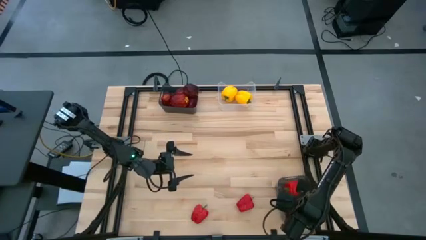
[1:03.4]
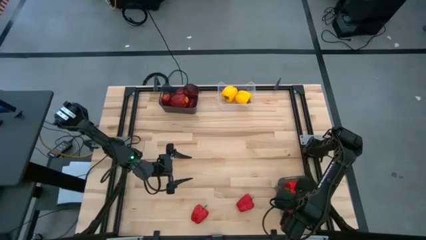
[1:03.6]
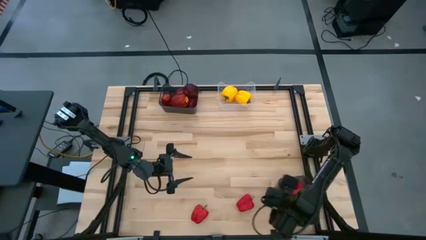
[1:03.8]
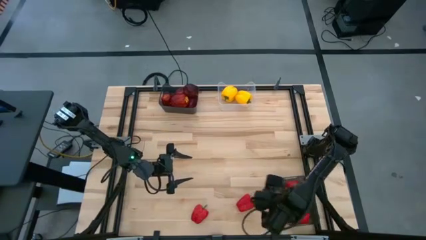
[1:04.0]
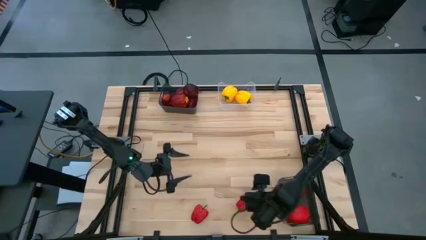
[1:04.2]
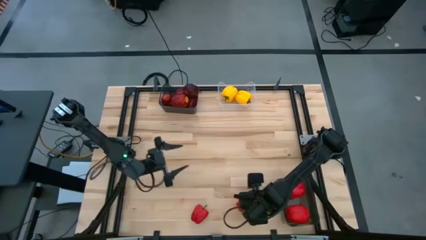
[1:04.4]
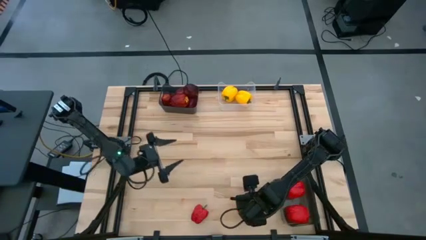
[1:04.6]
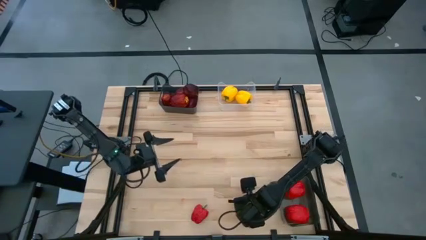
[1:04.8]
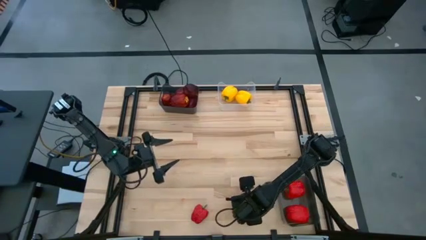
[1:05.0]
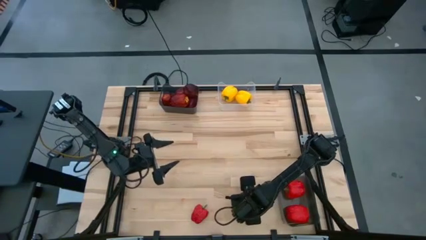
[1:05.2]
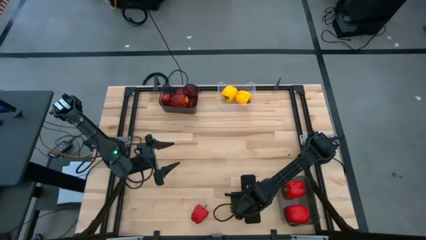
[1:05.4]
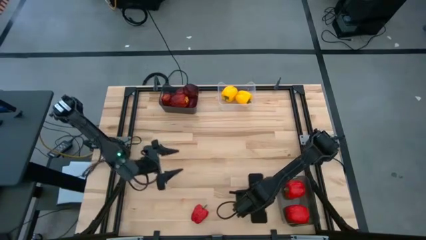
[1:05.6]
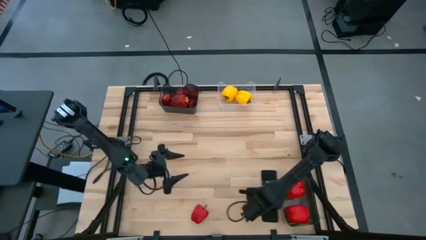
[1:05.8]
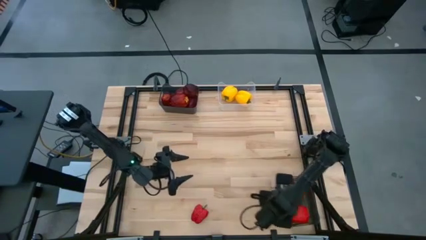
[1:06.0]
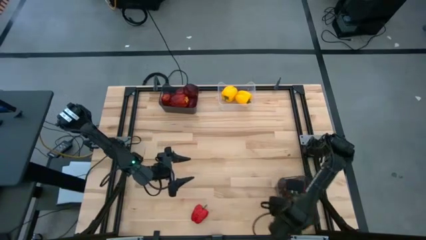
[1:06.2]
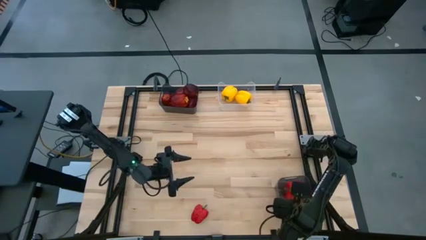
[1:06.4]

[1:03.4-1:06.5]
Task: Sort produce into baskets
Put the red bell pepper into the bottom black bin

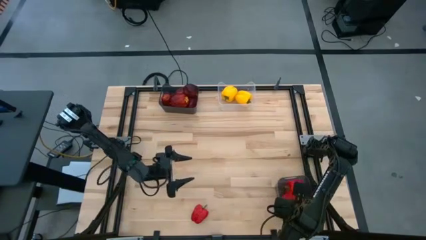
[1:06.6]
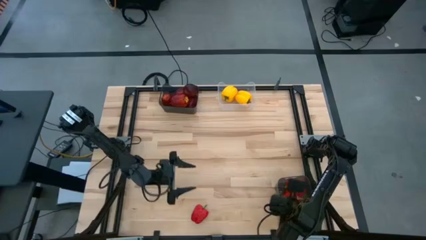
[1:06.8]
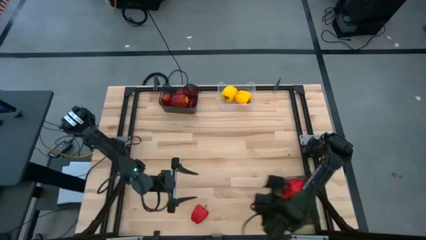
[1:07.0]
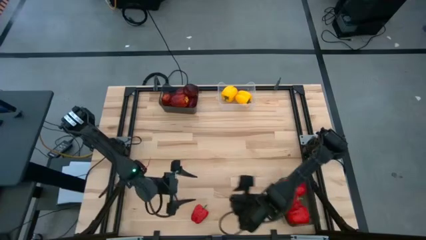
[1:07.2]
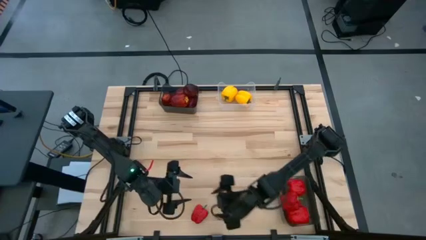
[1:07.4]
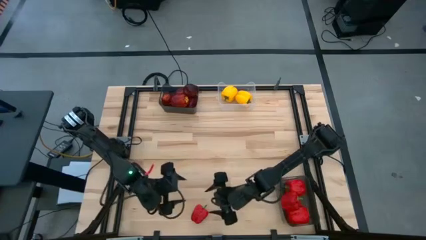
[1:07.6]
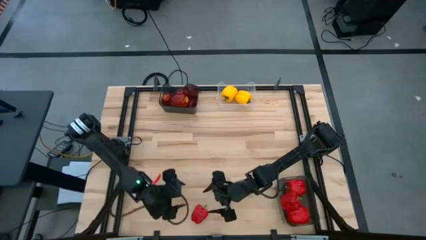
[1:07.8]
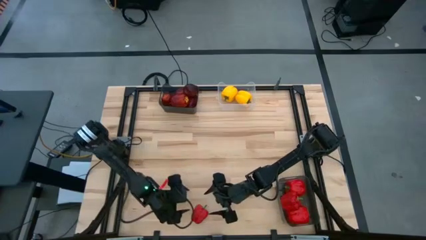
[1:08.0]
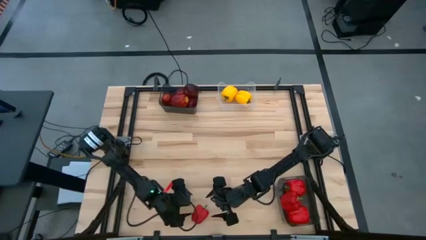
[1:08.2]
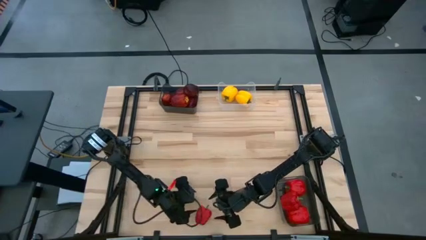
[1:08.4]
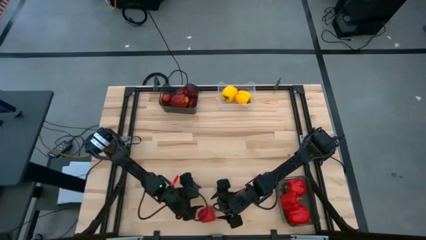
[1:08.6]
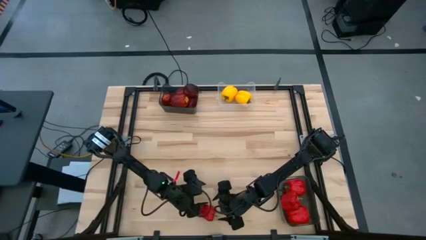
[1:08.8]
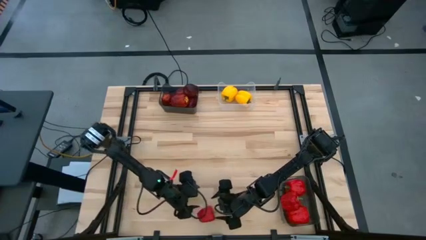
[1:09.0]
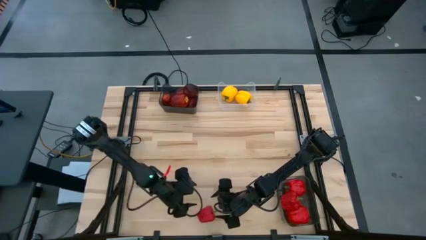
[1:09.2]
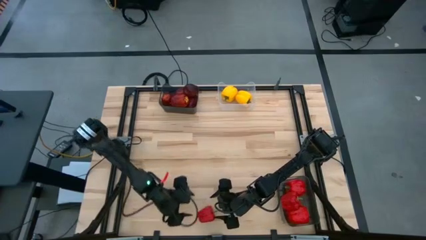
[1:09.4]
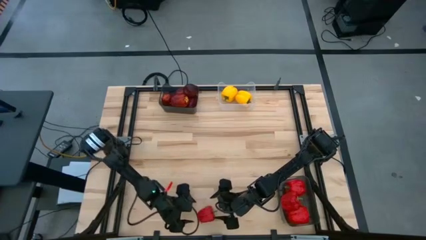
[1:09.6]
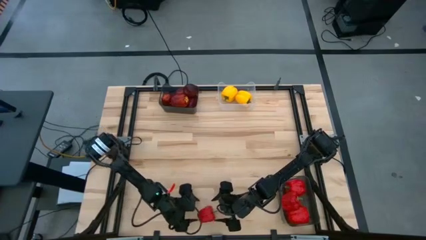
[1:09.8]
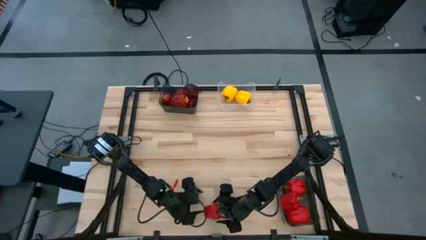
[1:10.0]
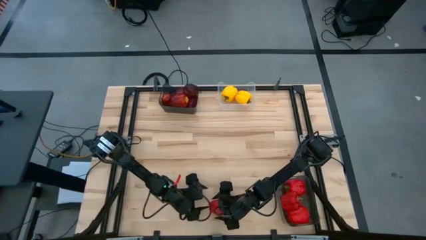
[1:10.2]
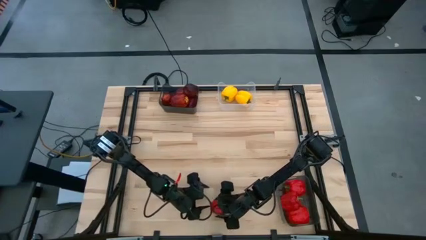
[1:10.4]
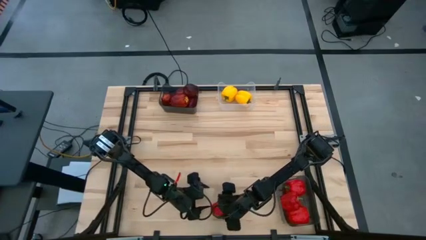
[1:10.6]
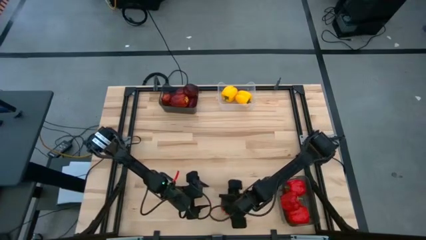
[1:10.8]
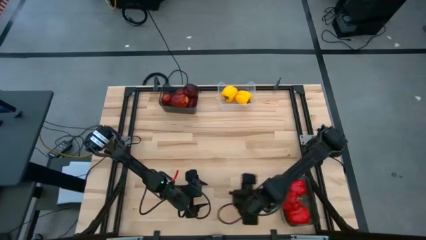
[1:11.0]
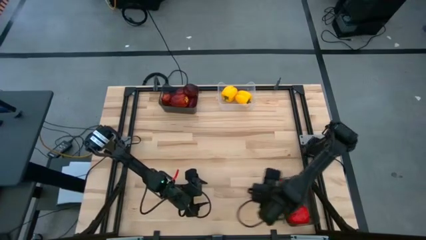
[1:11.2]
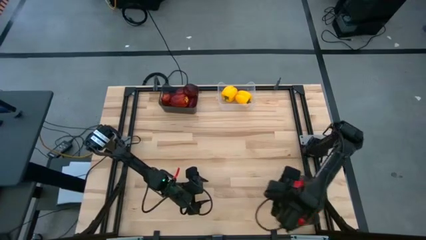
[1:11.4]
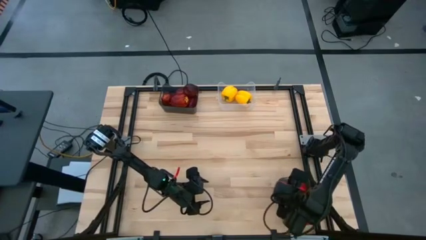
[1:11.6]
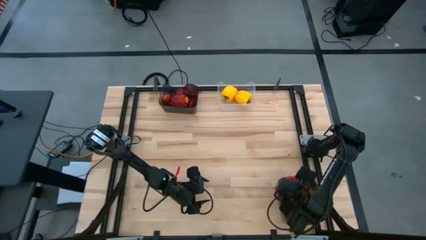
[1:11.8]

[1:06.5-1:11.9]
Put the red bell pepper into the bottom black bin

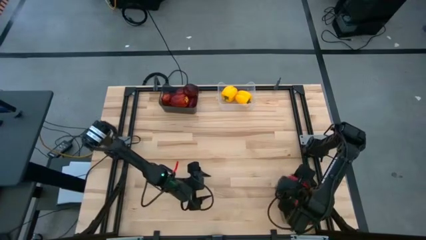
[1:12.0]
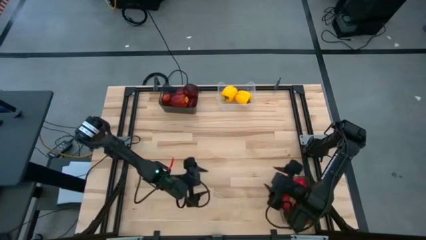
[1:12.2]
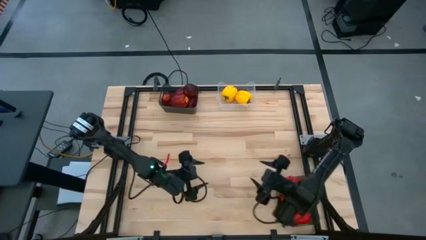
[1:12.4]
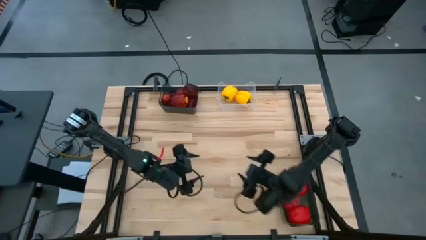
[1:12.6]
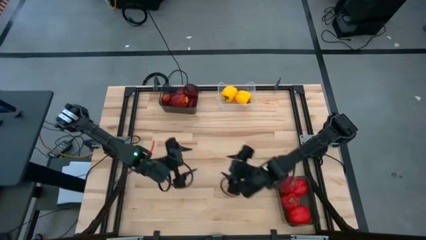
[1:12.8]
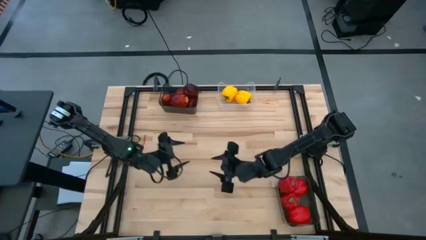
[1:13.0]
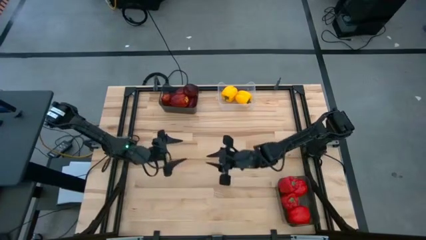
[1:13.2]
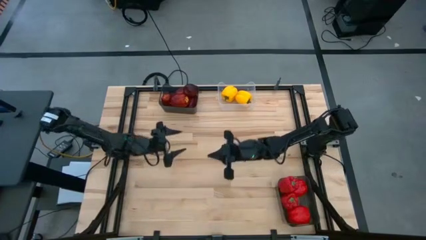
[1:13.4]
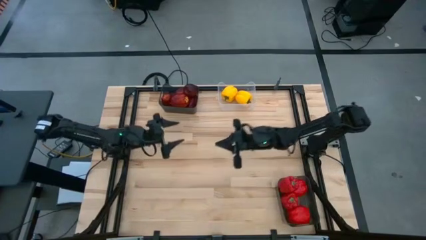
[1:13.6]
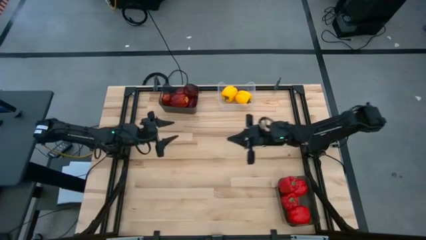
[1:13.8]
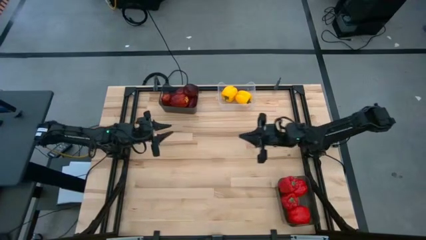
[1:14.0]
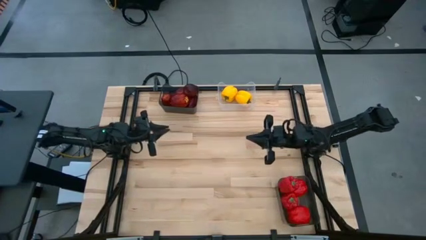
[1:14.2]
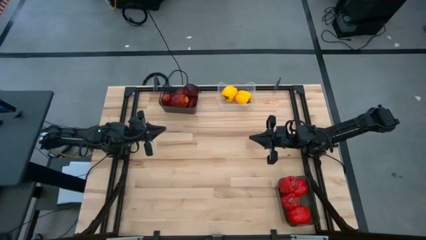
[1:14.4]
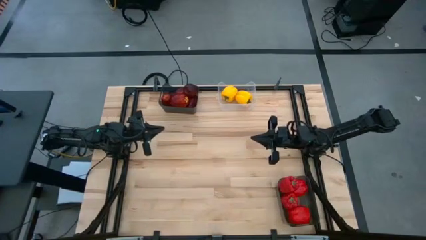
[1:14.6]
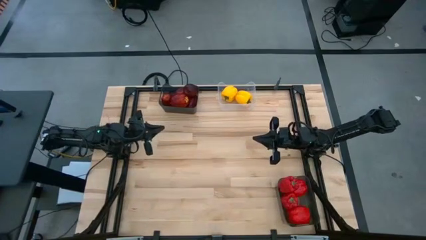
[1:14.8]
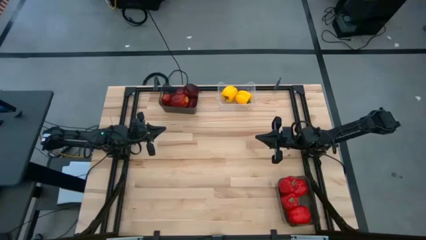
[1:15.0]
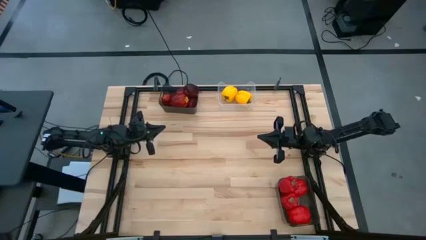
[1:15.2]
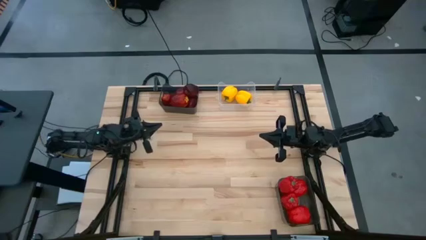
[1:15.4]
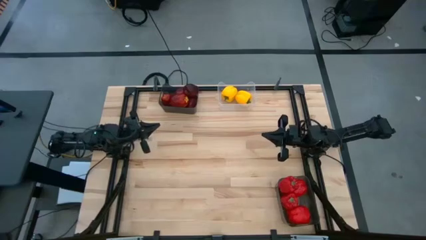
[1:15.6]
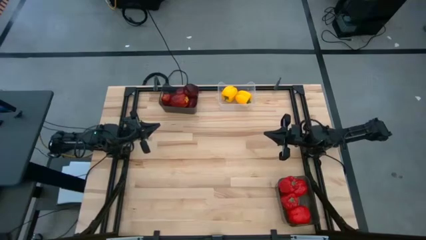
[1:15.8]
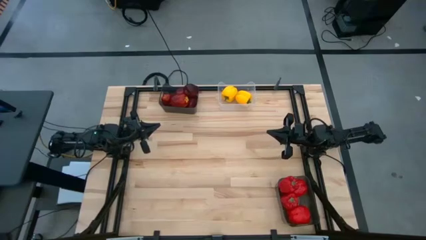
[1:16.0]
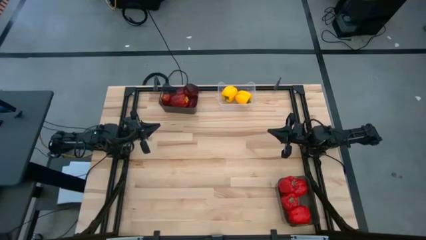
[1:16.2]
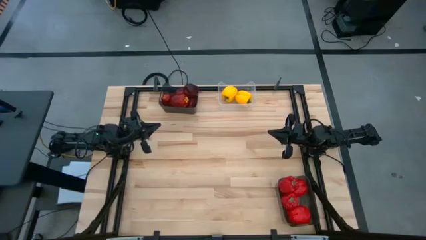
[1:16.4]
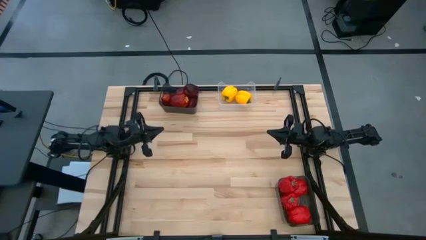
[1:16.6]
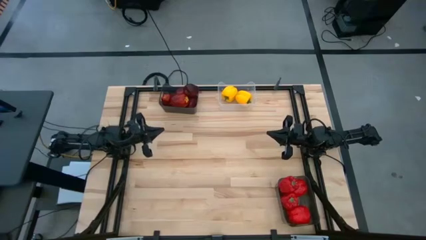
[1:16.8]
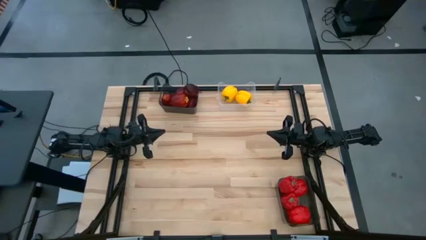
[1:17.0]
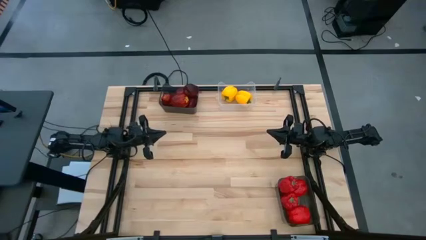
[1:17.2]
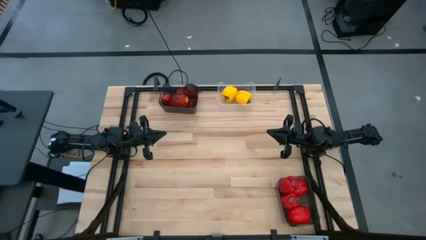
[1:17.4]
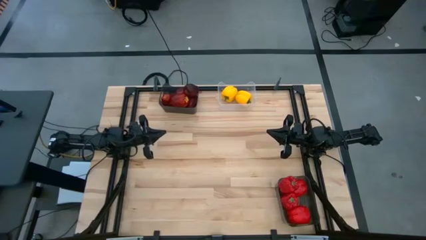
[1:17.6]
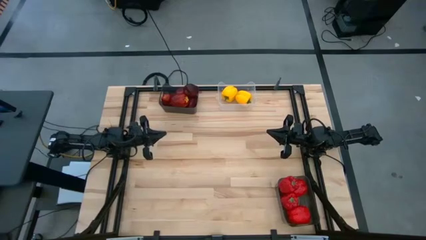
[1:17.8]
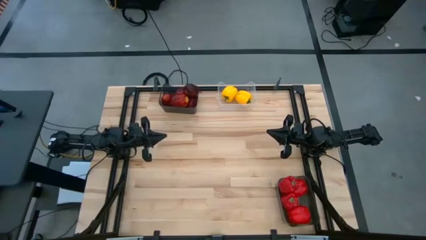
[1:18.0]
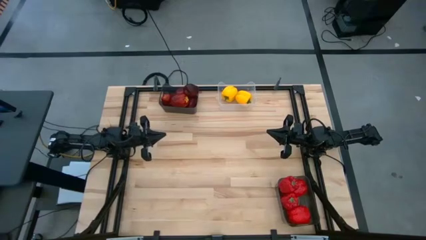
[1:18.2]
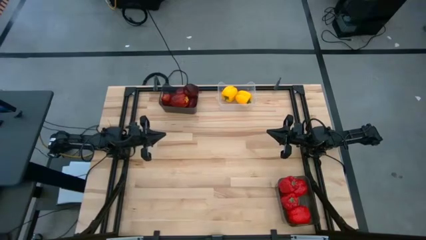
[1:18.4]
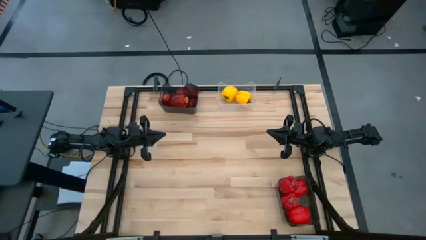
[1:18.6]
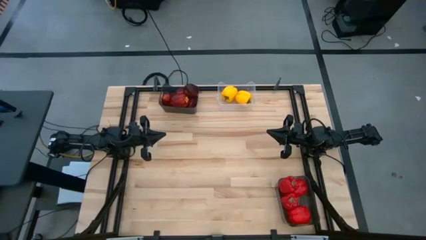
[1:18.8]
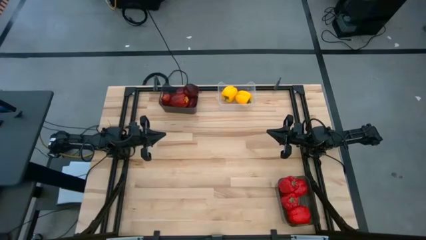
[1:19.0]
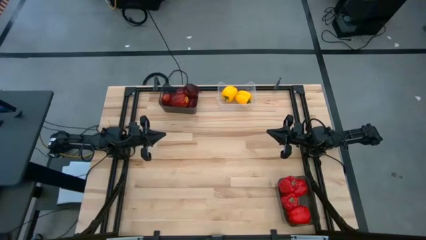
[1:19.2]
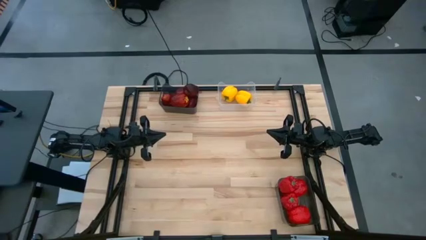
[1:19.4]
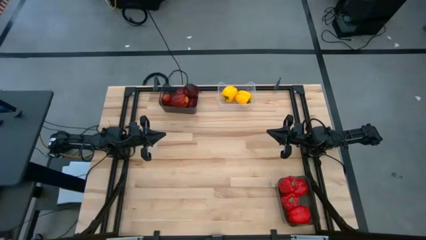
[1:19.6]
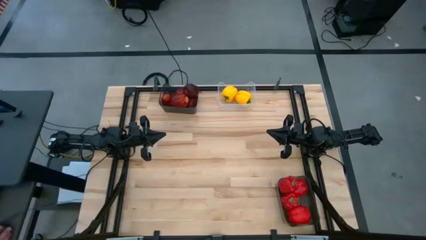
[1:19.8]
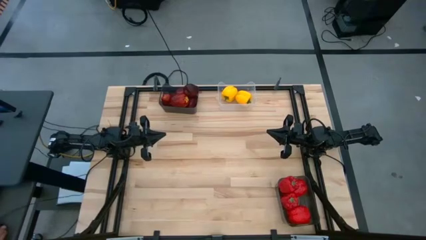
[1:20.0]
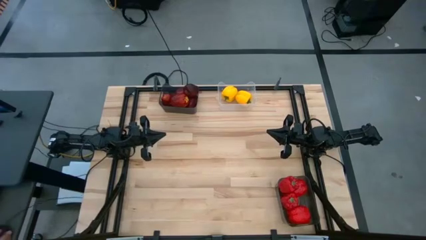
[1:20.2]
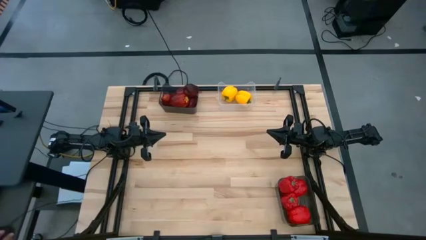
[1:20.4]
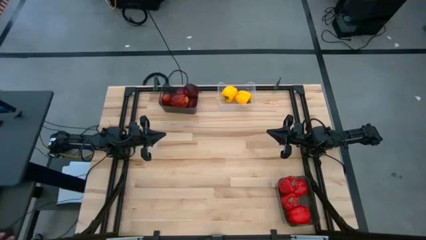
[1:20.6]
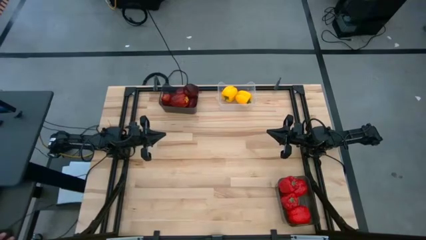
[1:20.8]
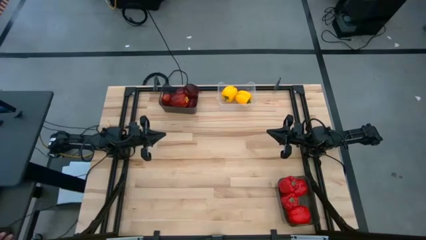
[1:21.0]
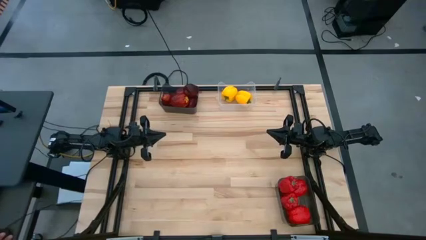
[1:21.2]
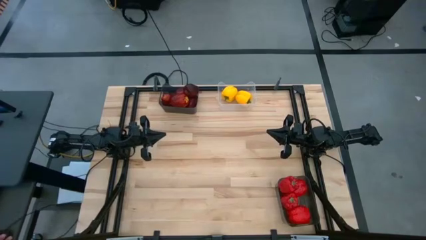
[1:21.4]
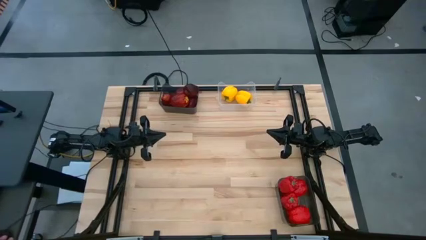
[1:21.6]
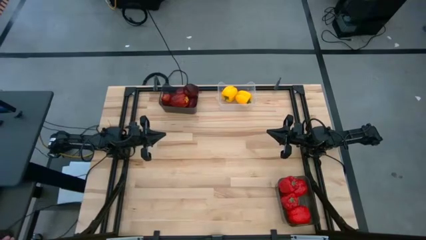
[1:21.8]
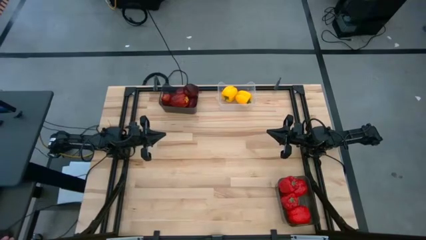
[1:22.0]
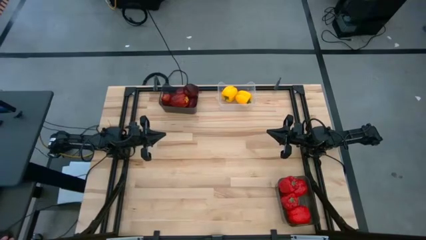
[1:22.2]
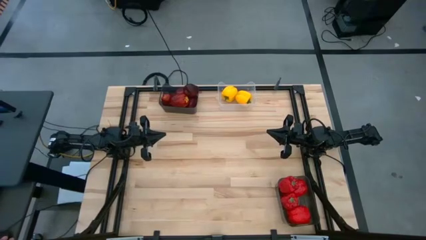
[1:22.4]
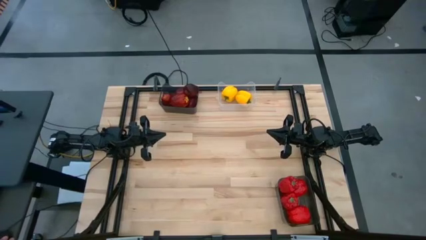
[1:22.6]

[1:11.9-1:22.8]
Return to Home Position
